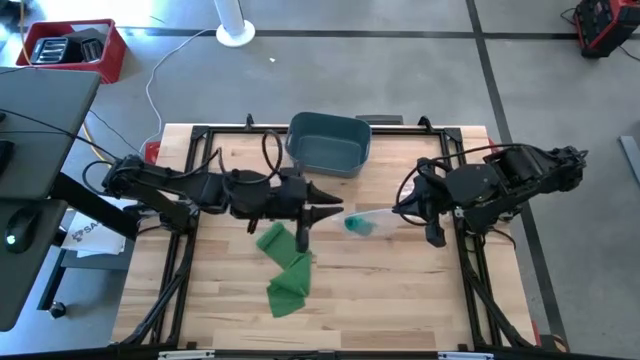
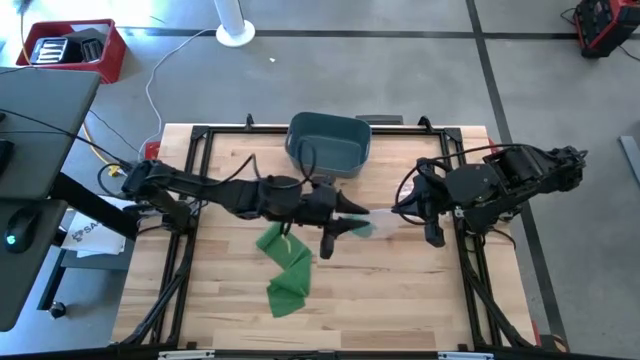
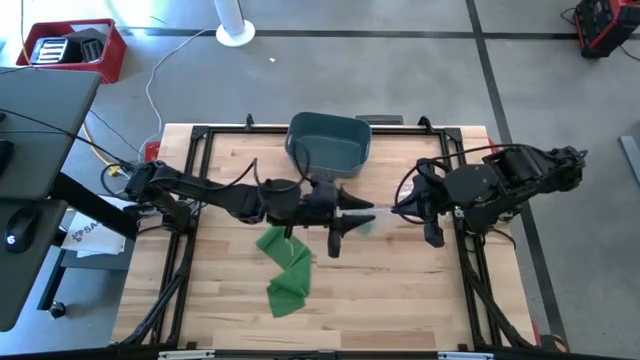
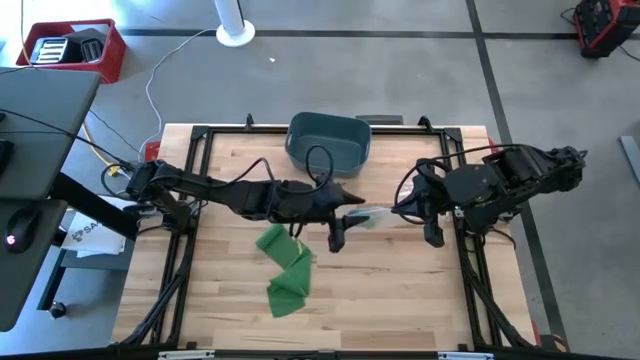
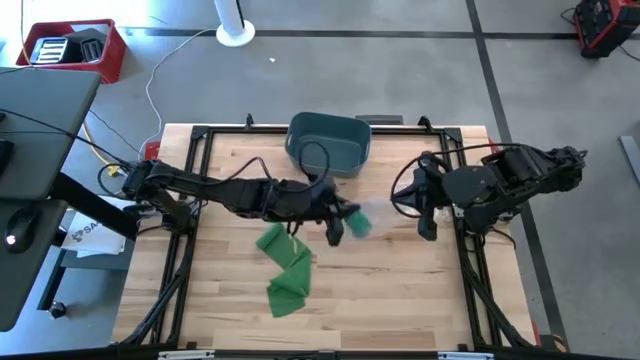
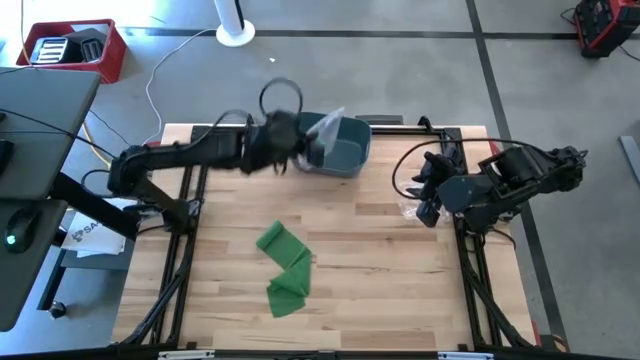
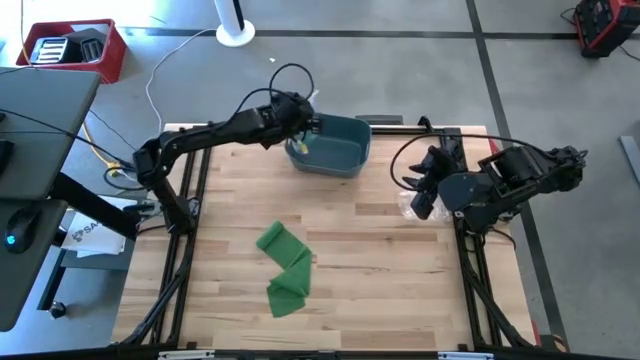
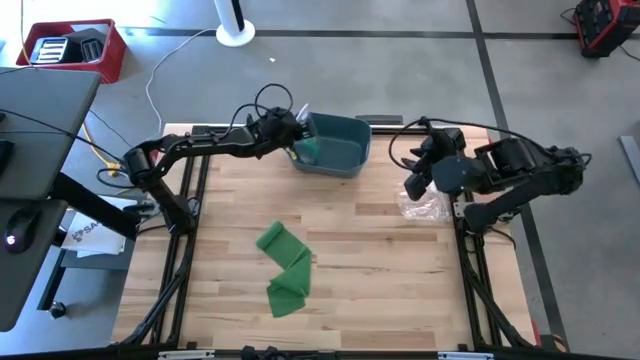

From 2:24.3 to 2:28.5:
Task: Roll bandage
Put the packaged blue bandage into the blue bin

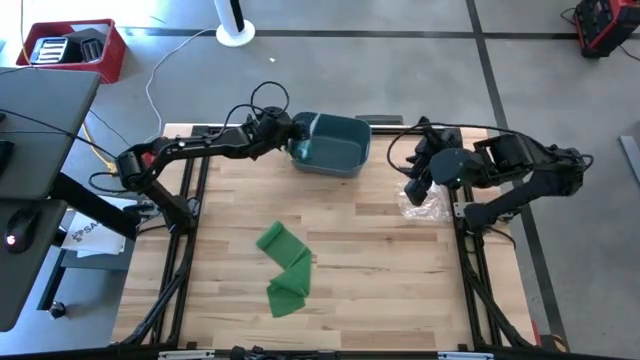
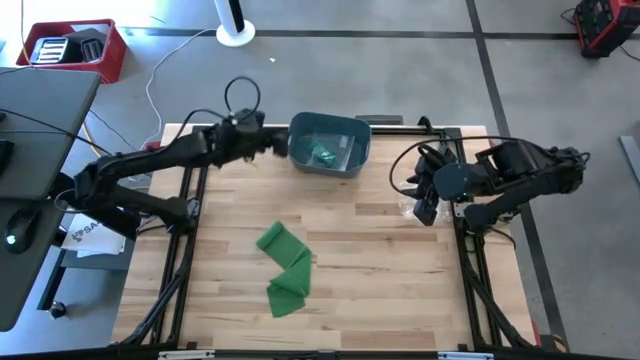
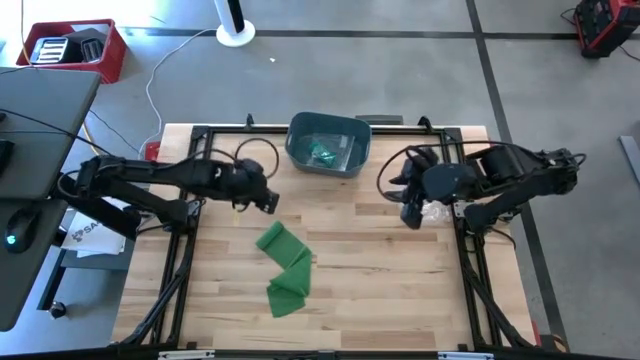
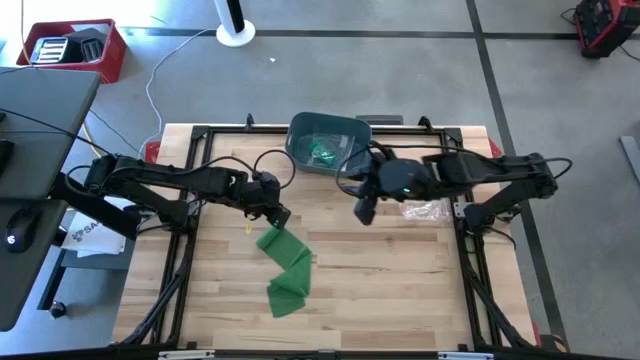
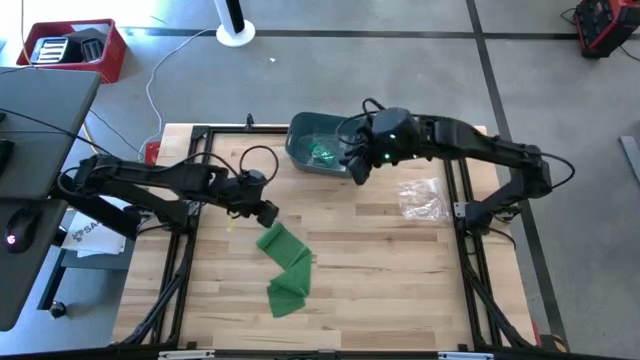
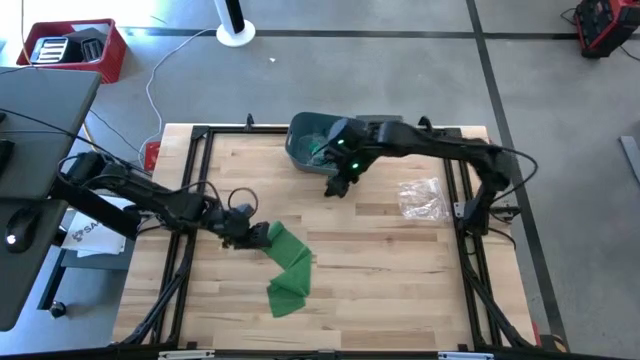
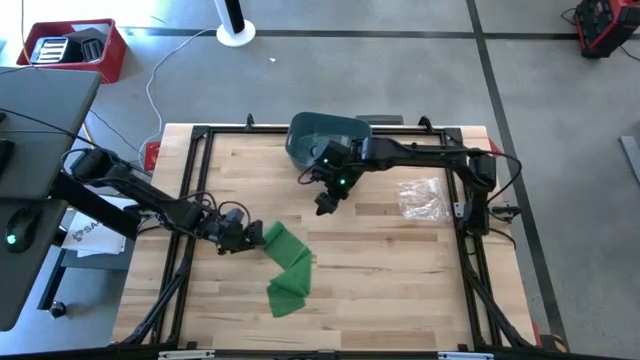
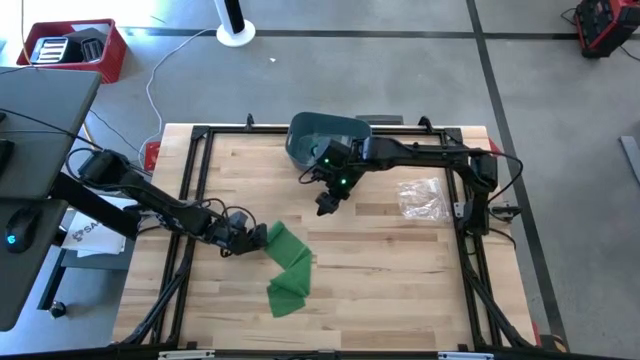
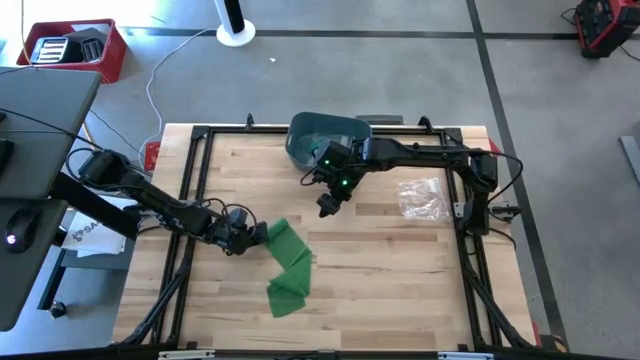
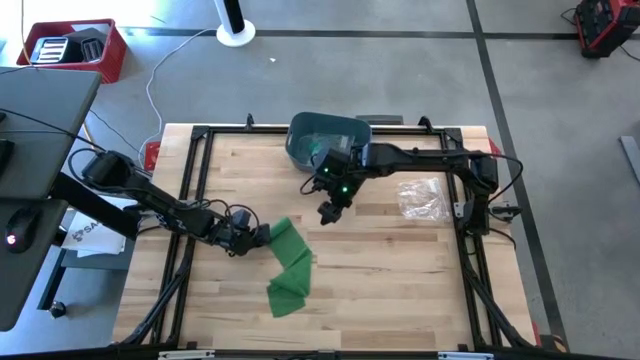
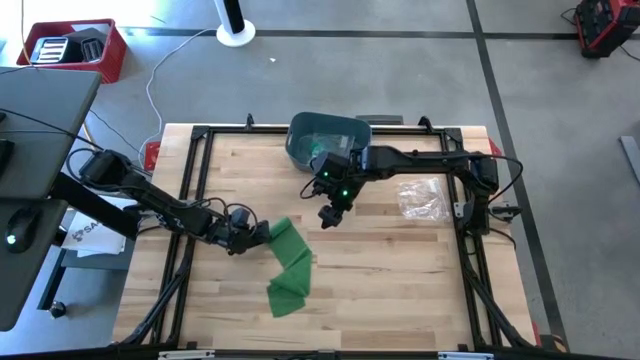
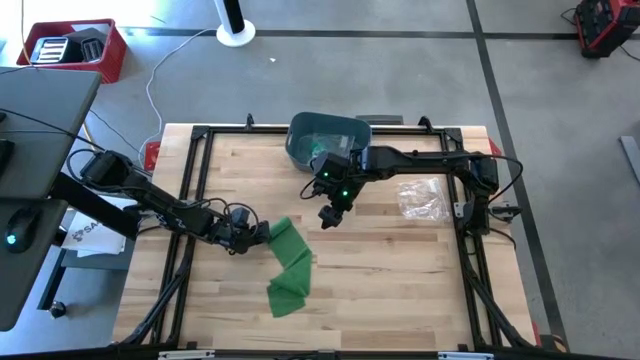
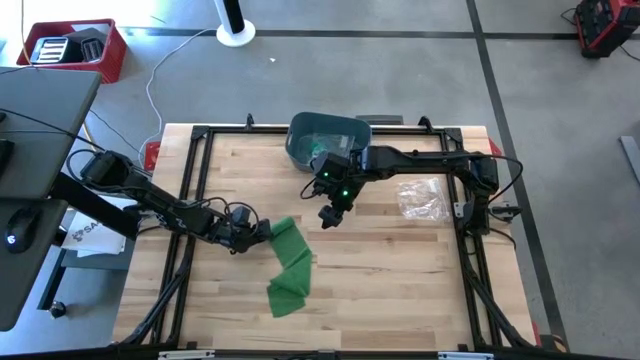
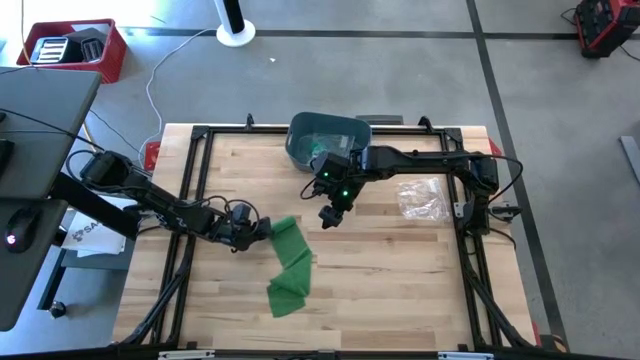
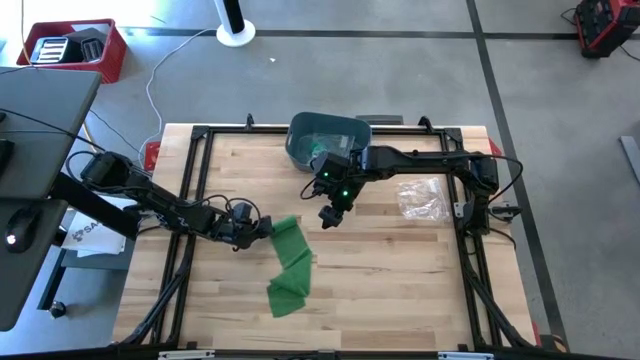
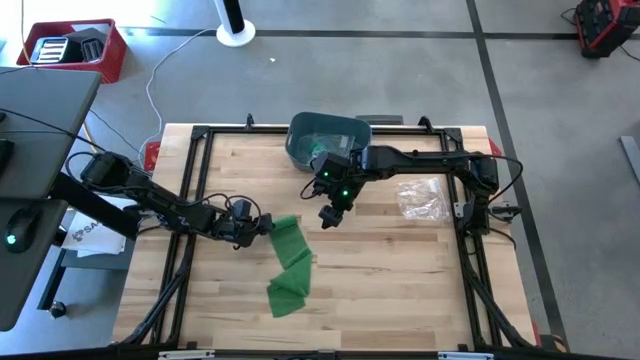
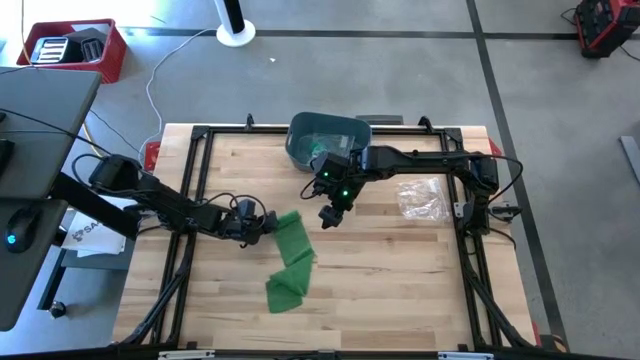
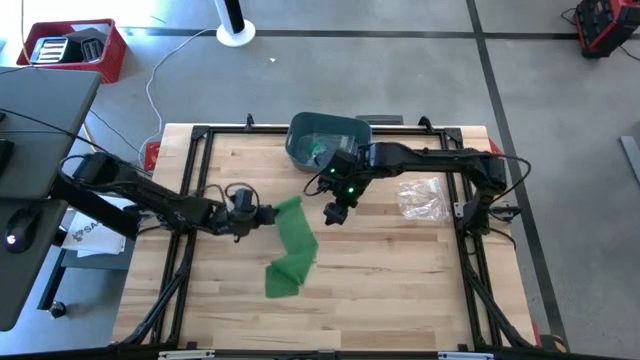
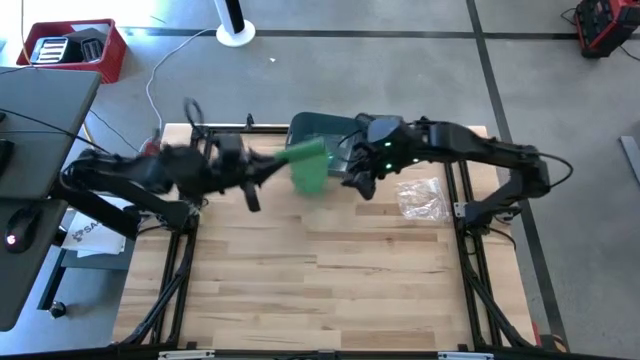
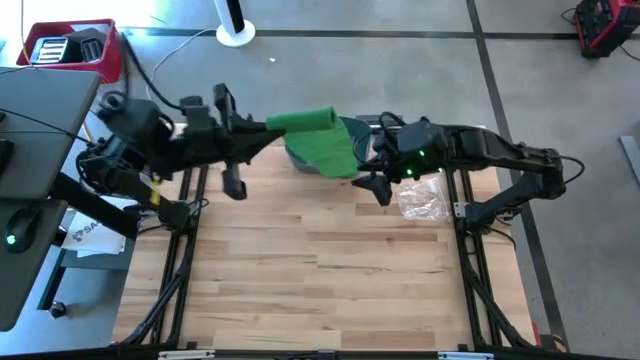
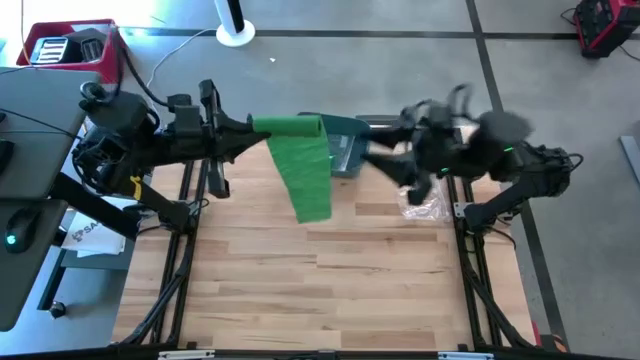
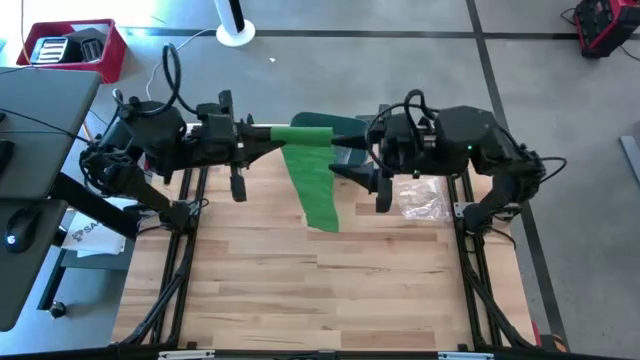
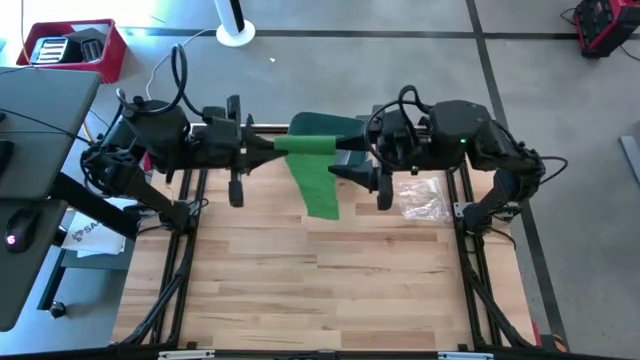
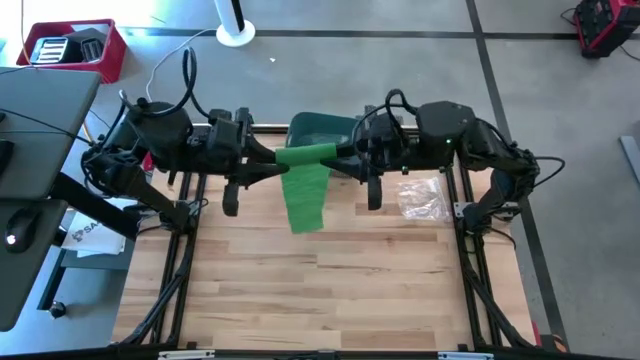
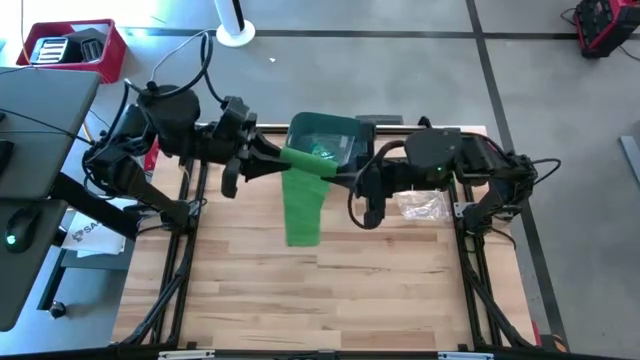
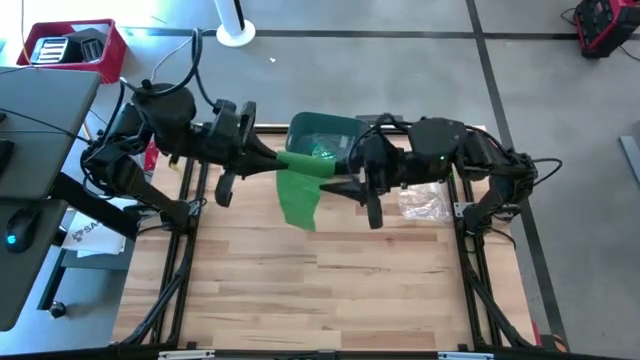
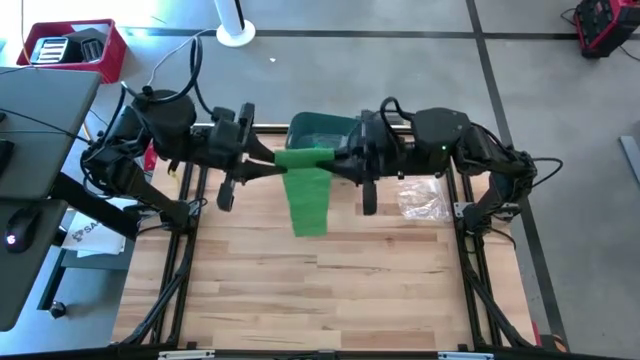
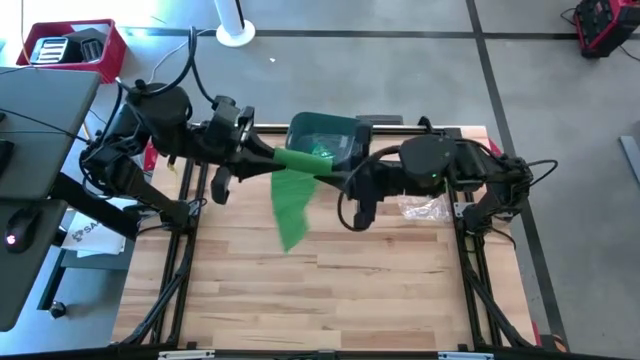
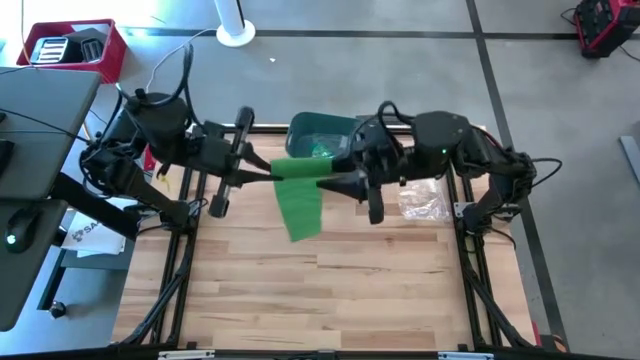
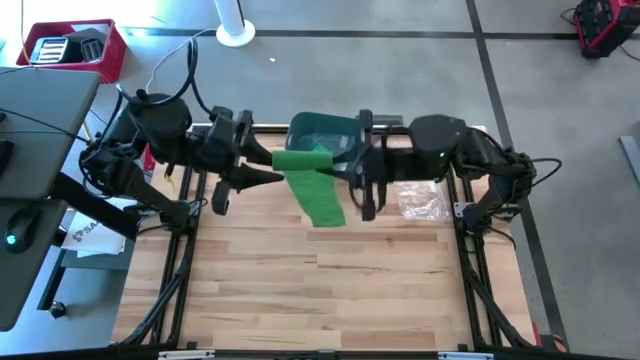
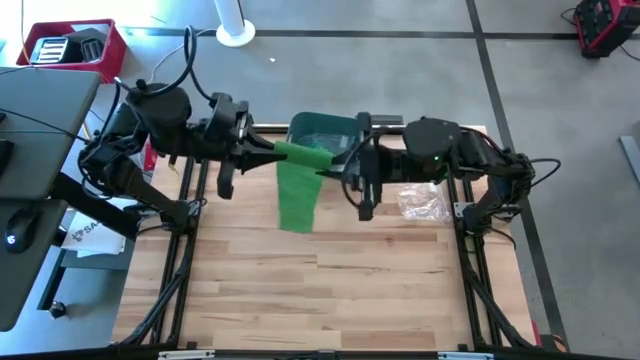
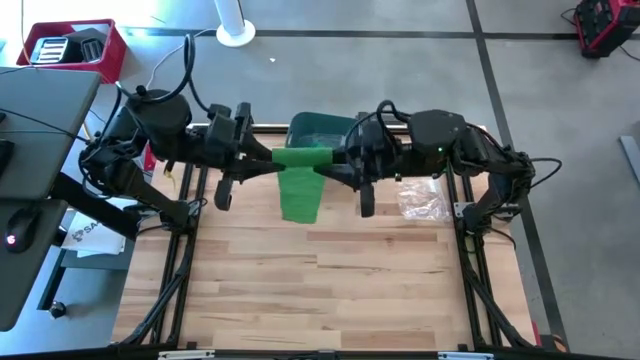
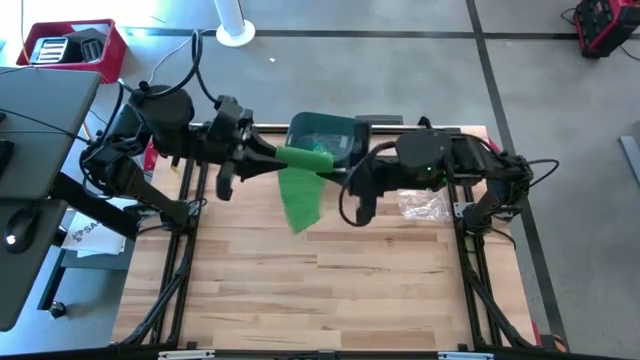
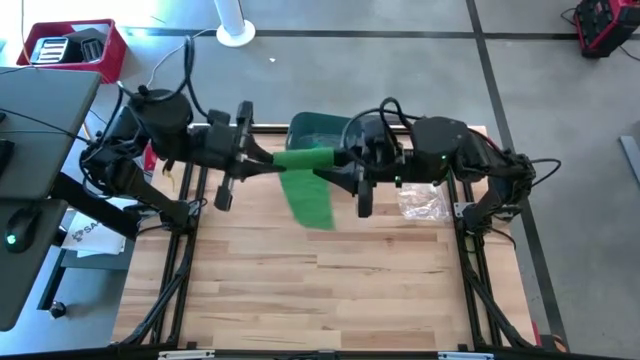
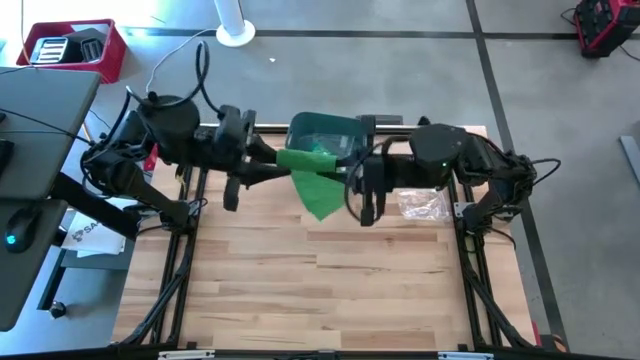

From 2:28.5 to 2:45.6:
Roll the green bandage
